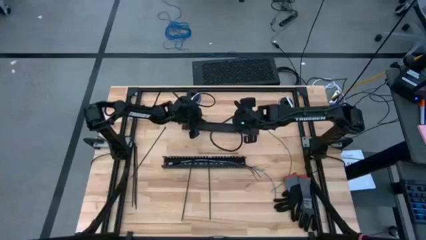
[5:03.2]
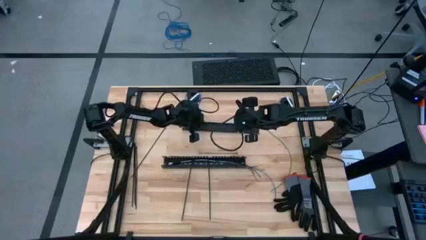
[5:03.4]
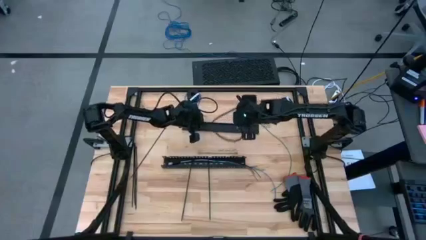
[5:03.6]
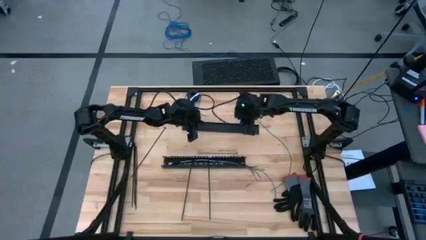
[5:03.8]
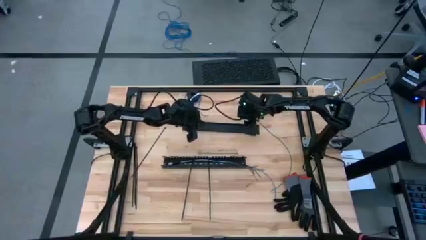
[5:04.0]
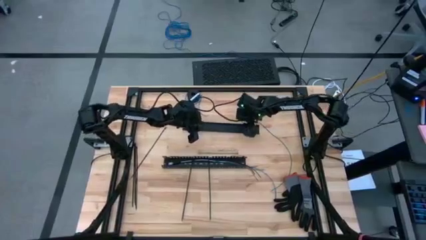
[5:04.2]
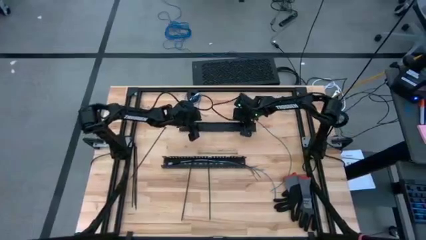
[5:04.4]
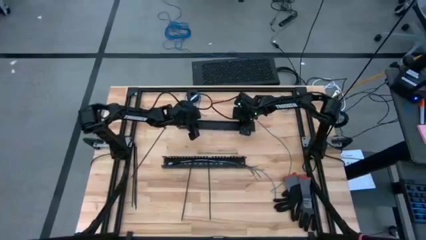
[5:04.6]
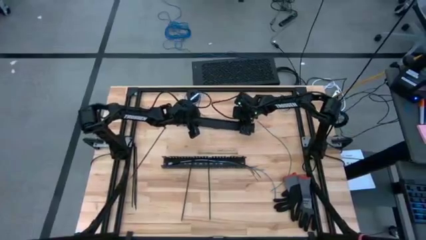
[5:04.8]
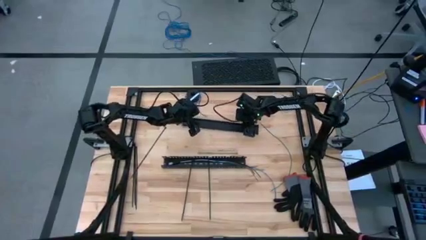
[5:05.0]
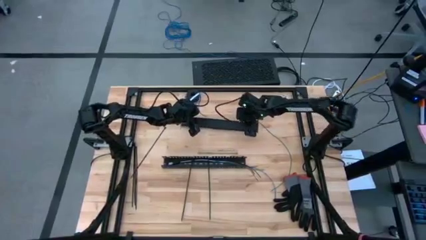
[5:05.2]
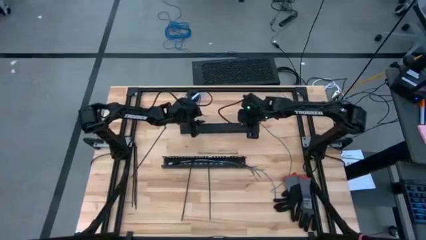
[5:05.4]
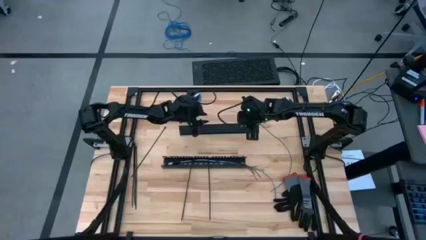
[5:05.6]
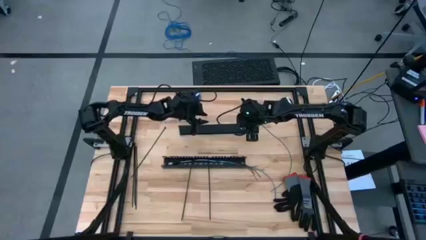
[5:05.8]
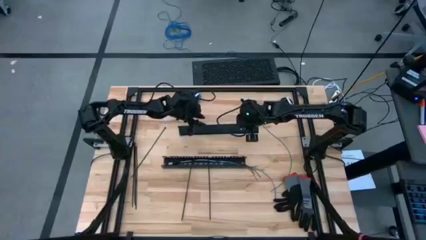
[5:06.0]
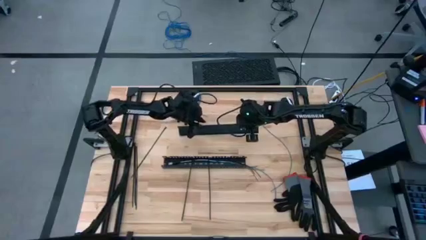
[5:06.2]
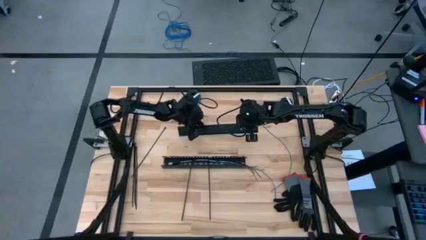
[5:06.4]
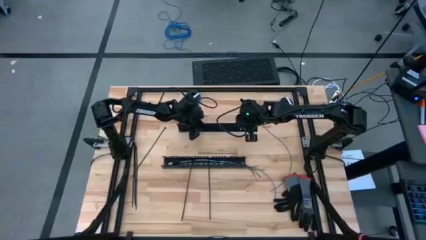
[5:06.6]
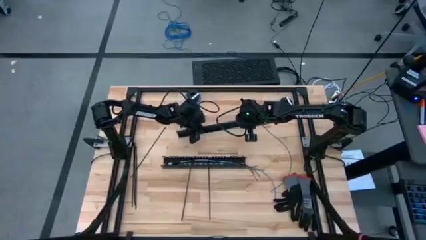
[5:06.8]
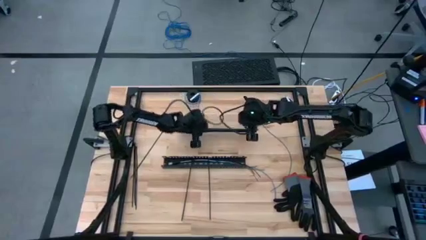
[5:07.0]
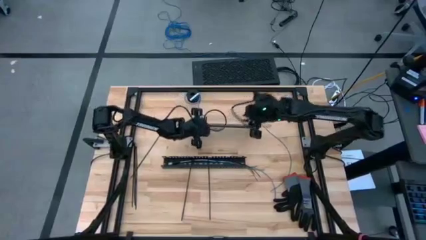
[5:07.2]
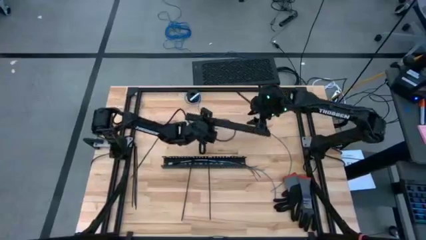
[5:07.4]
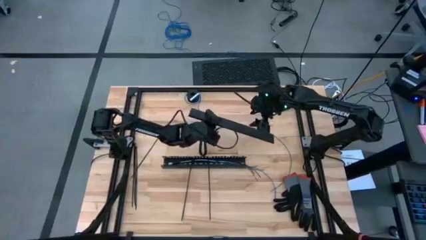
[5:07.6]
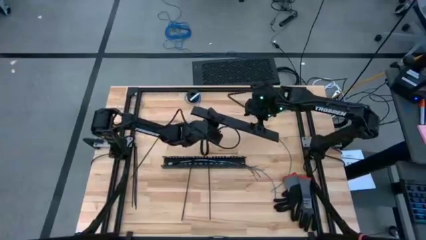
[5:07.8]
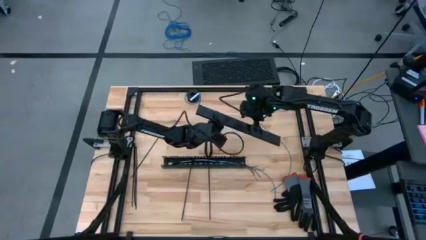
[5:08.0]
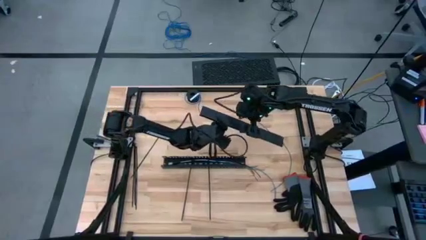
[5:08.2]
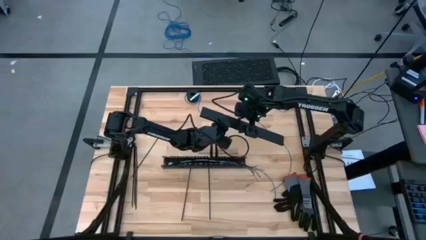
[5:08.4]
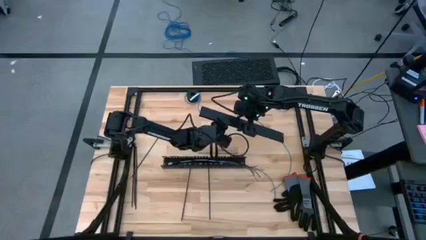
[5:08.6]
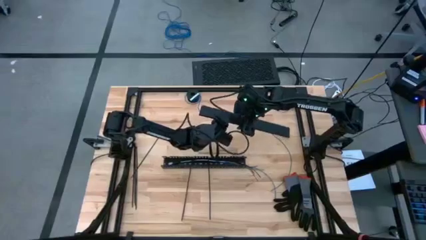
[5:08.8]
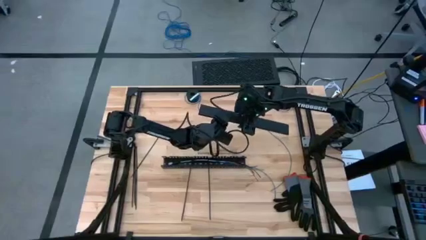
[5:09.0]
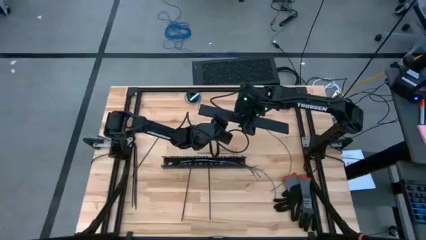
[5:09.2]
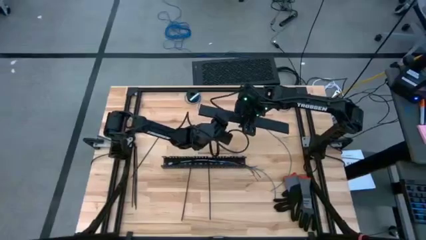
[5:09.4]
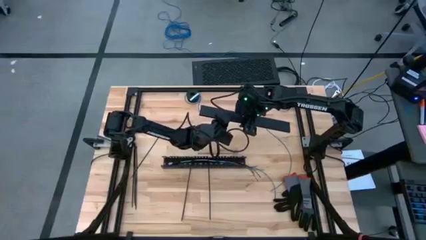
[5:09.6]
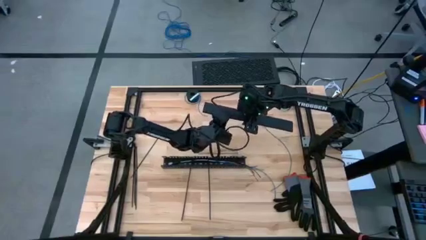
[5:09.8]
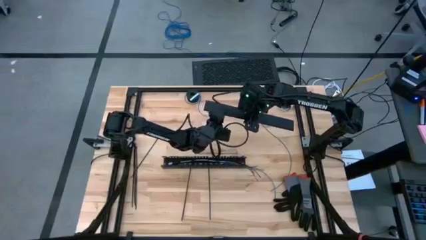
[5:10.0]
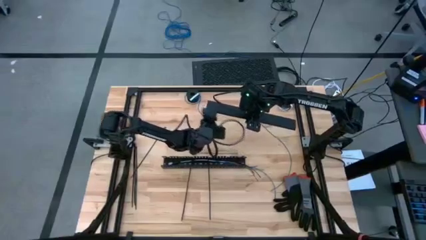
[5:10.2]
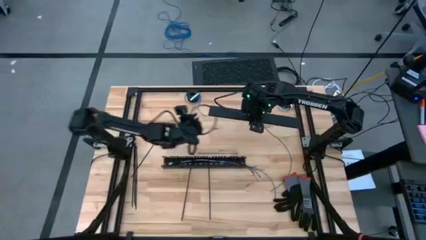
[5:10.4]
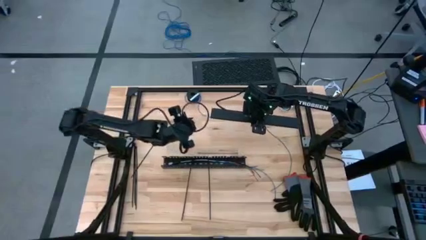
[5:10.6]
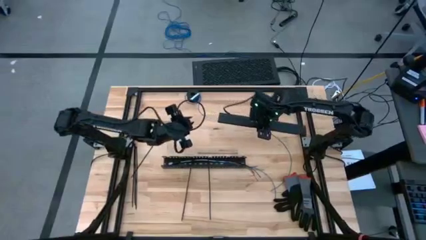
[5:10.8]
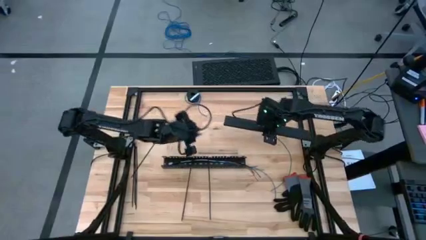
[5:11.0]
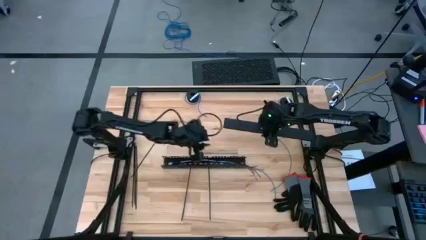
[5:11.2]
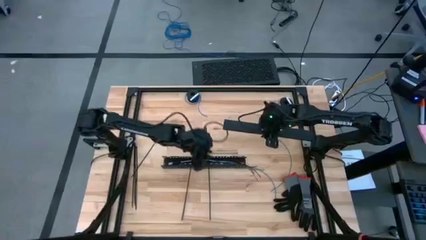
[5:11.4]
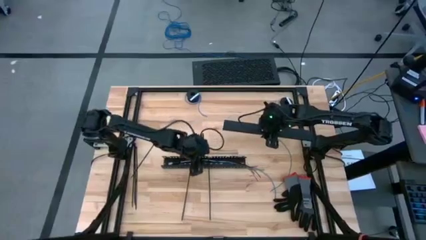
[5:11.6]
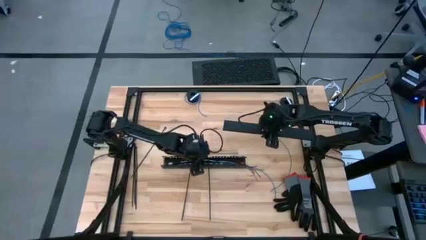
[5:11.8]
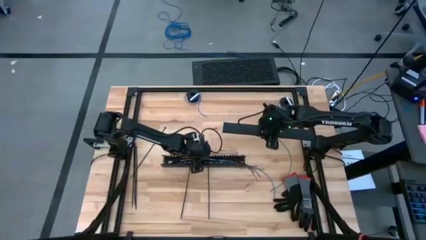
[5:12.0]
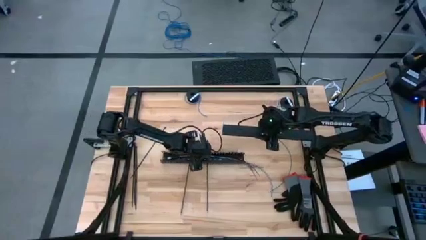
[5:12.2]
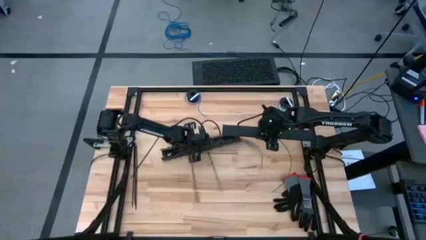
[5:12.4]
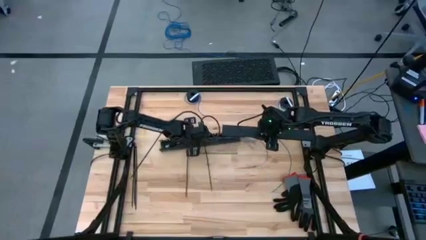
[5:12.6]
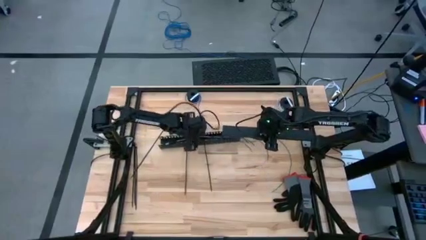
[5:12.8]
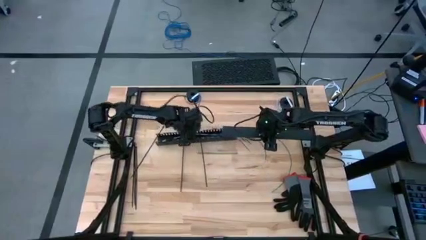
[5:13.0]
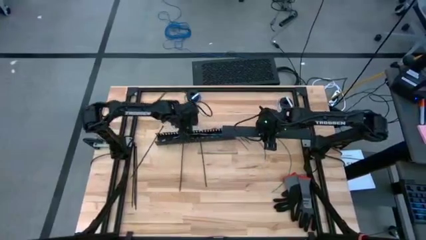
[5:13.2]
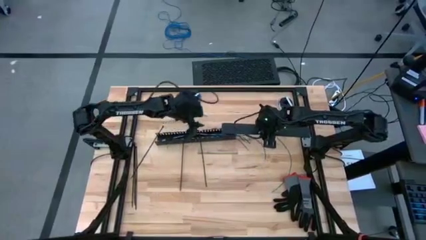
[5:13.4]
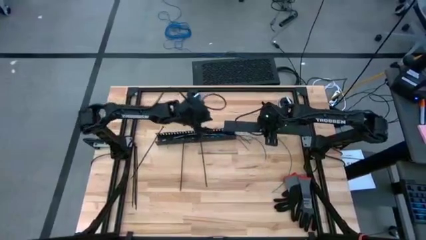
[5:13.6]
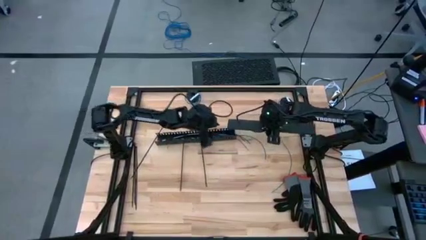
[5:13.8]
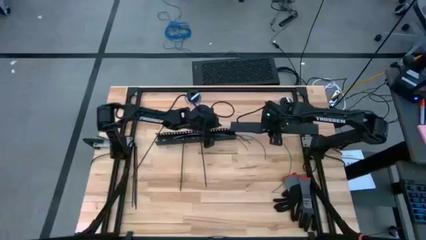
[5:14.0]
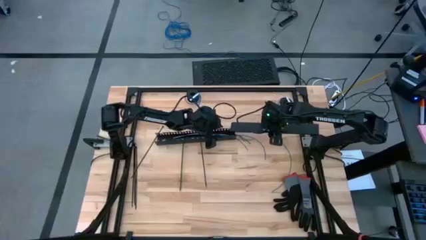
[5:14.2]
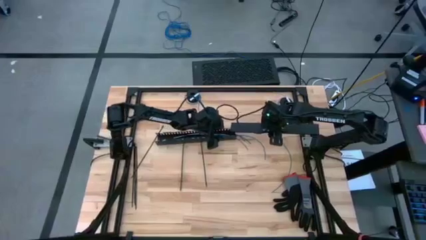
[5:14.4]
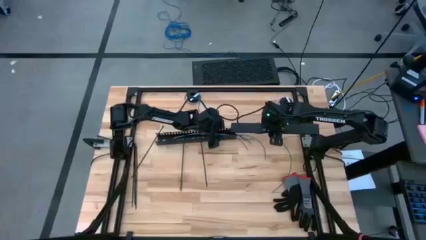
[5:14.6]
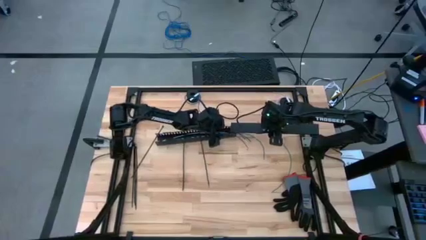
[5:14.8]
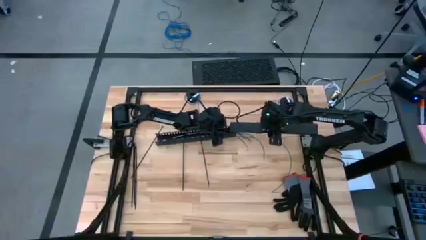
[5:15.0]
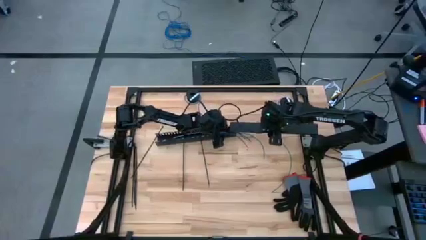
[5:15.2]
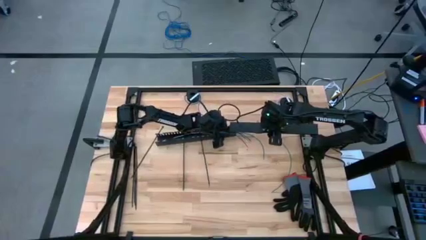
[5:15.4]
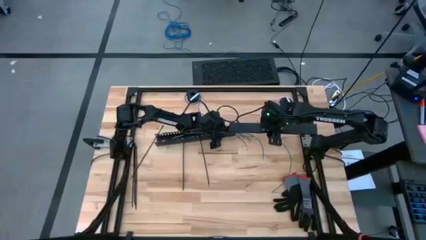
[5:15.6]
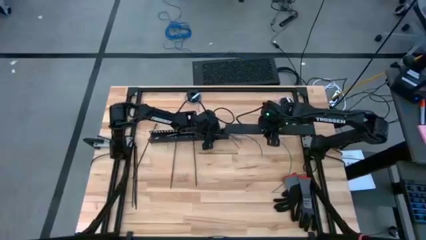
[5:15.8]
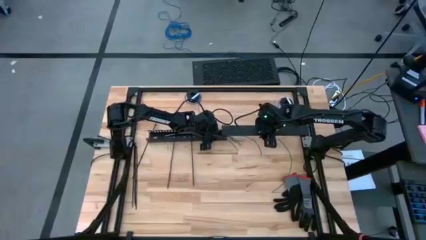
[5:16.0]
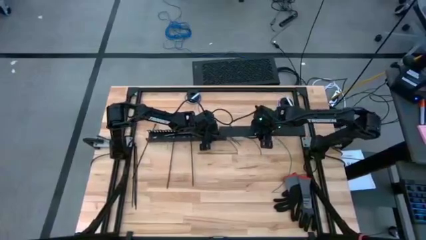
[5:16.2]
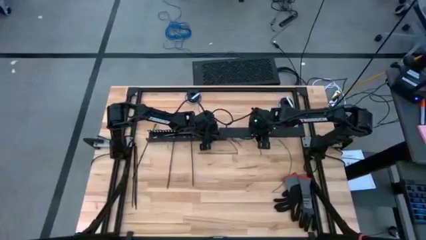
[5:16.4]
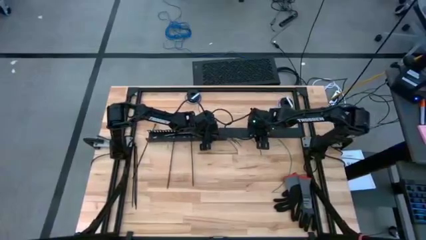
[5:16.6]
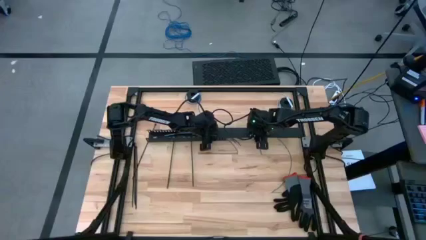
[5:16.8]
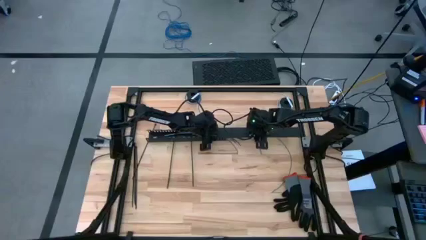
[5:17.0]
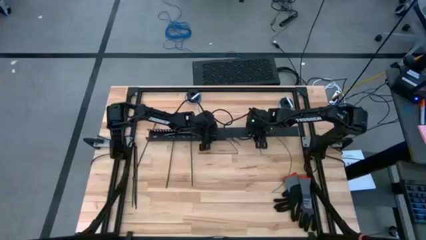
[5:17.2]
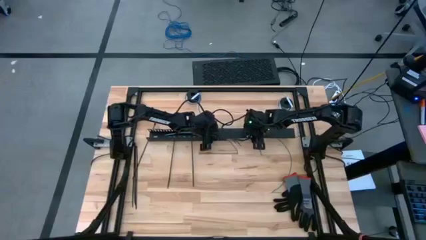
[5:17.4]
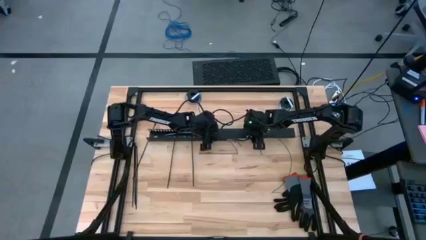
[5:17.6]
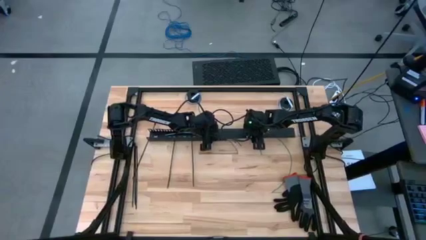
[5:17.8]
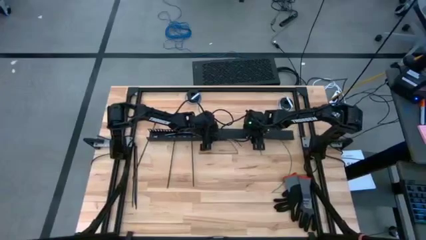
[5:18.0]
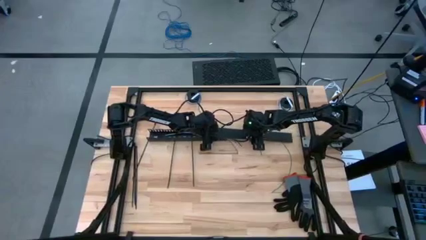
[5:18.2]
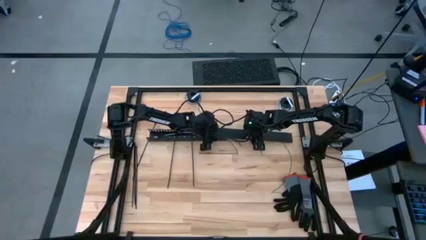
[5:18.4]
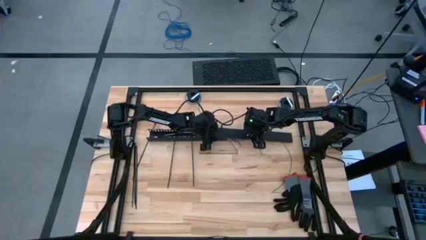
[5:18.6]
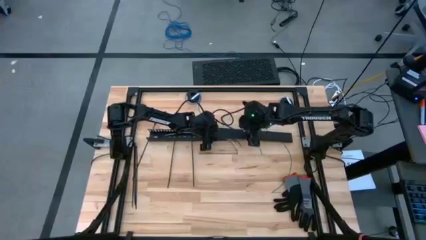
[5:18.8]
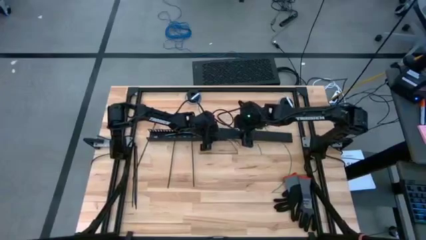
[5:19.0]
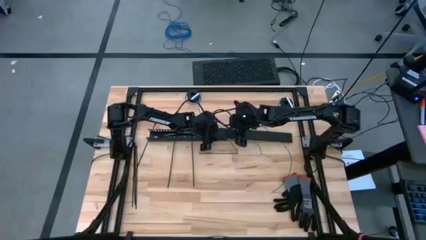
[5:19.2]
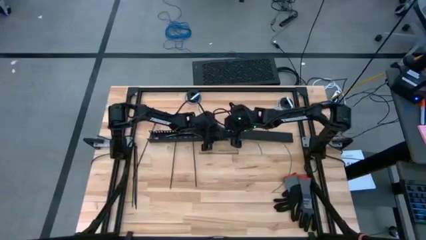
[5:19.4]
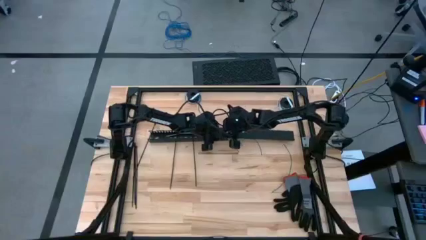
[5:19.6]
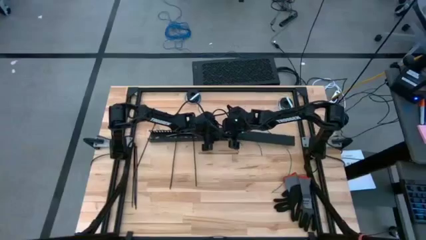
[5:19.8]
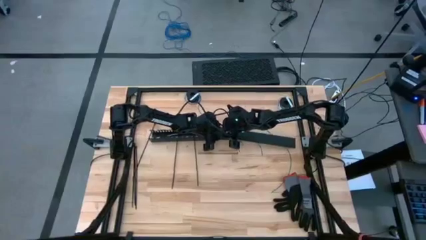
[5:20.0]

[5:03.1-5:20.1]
Task: Ziptie cables
Close the black cable duct
